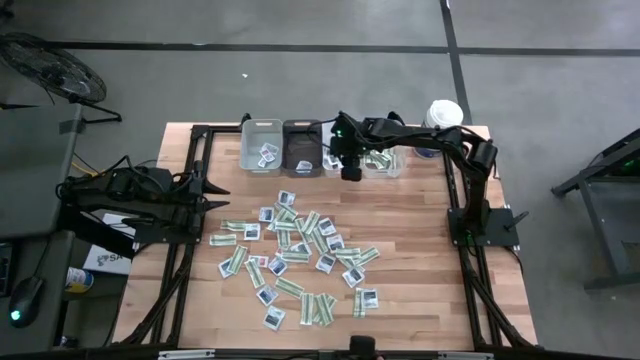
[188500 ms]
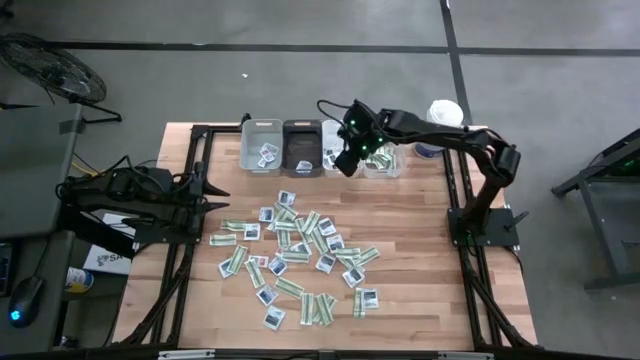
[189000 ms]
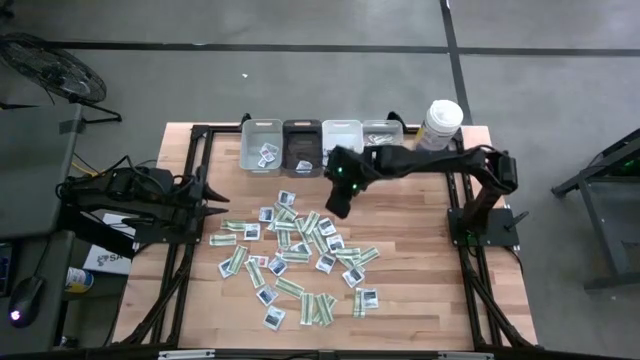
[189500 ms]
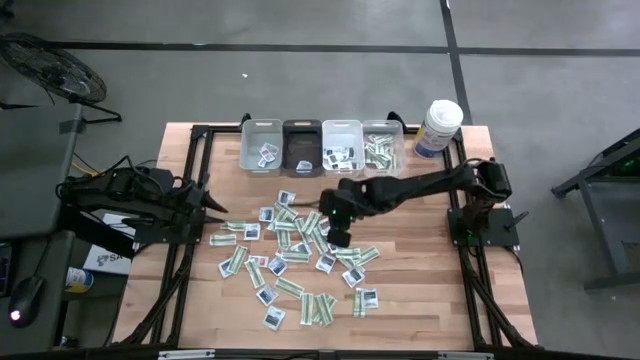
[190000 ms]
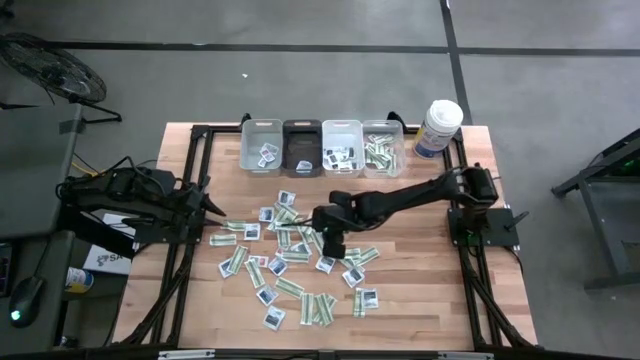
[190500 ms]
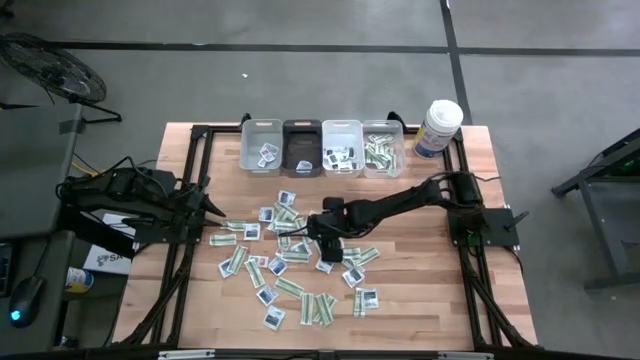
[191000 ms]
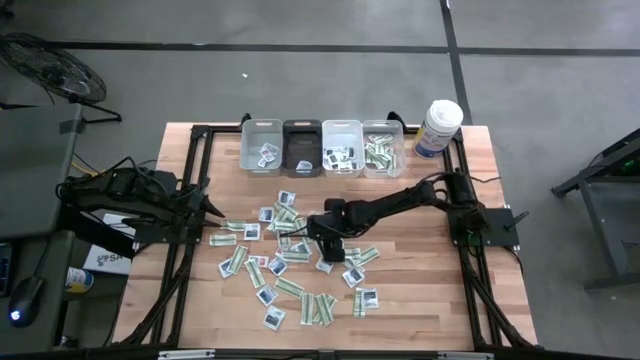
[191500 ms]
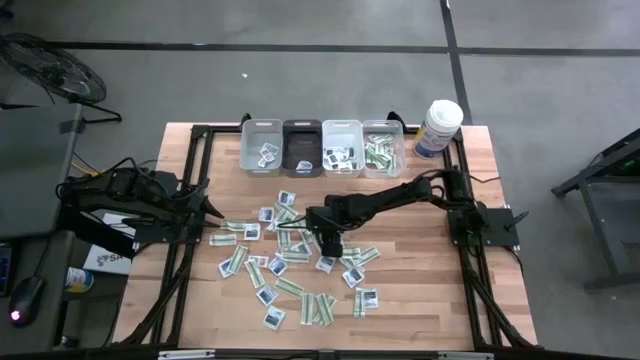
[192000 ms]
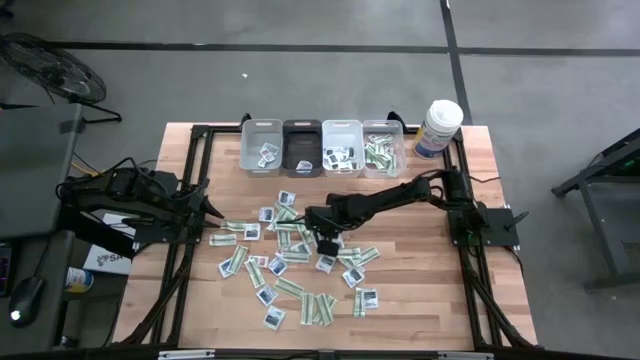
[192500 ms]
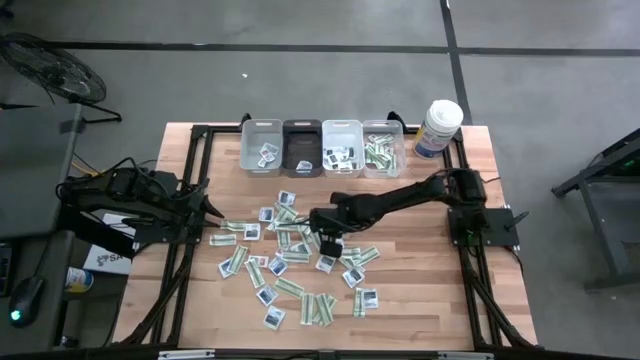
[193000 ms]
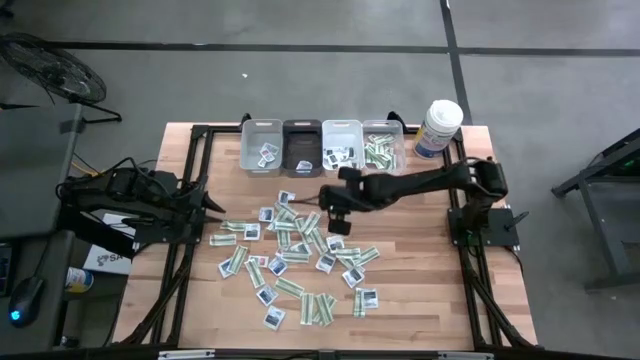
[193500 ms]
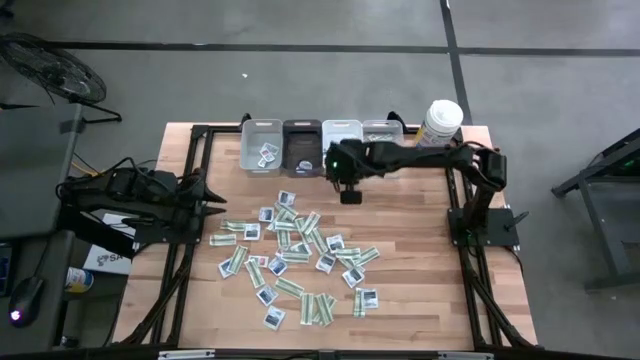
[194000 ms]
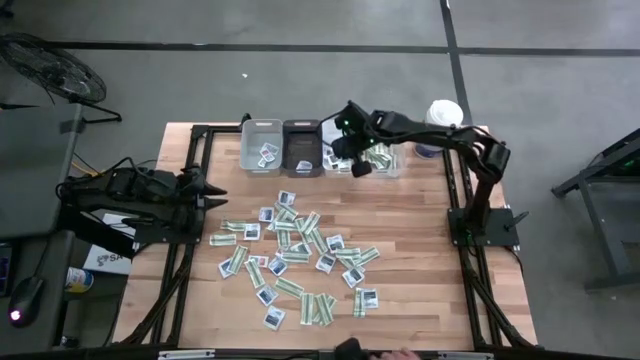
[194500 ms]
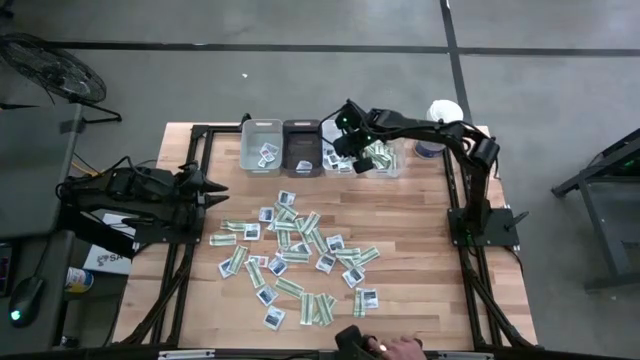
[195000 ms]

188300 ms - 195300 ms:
Task: Pick & Place First Aid Supplies
Put the black towelette pack into the white bin

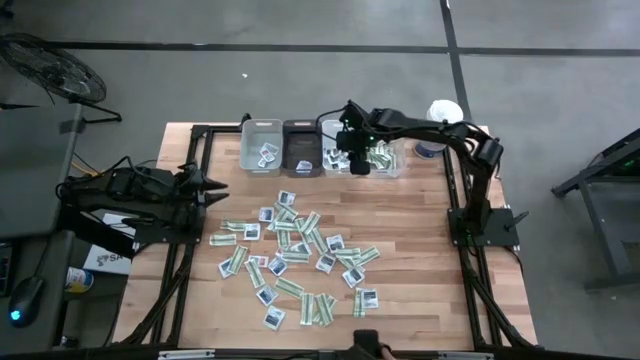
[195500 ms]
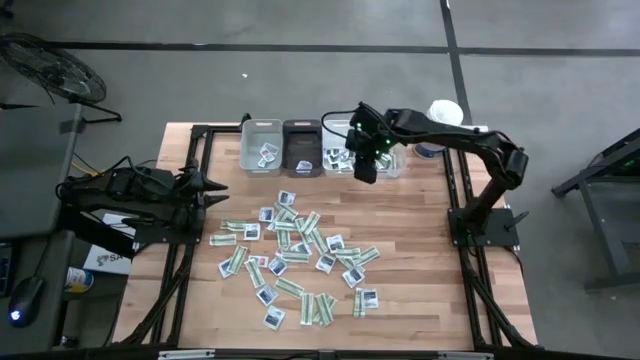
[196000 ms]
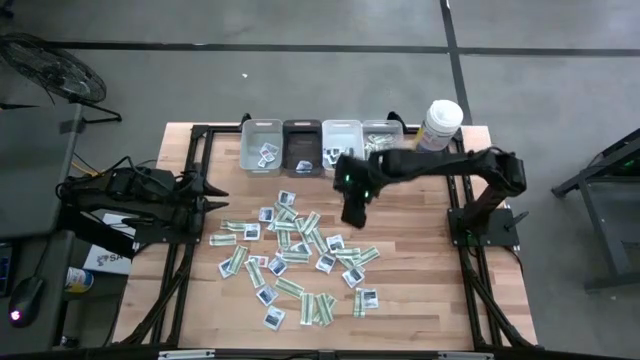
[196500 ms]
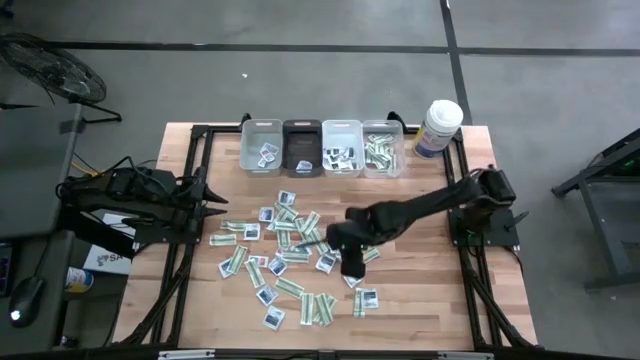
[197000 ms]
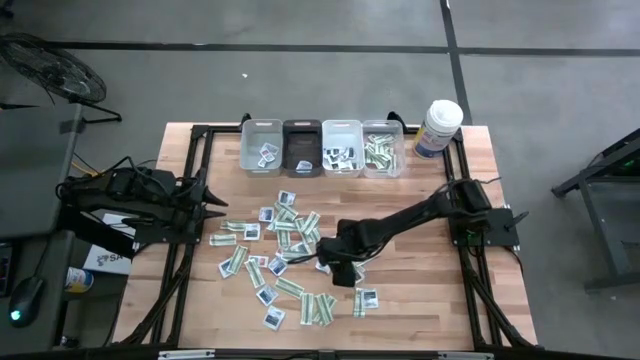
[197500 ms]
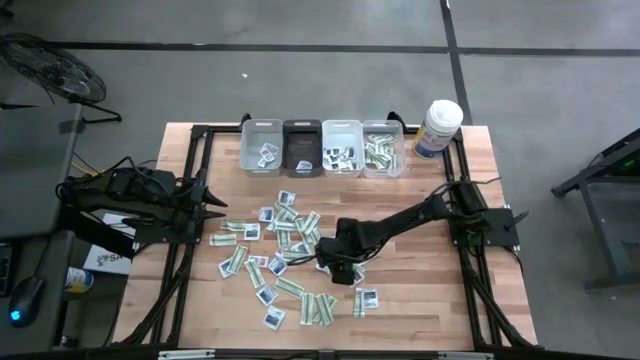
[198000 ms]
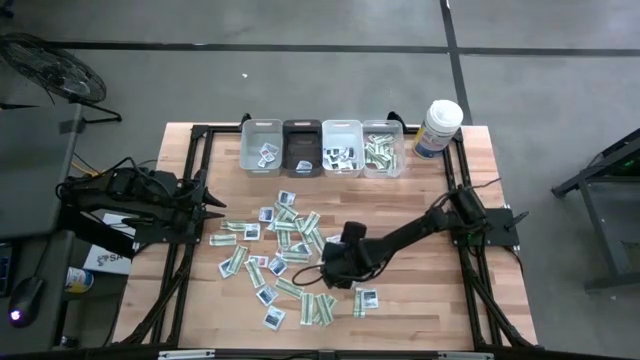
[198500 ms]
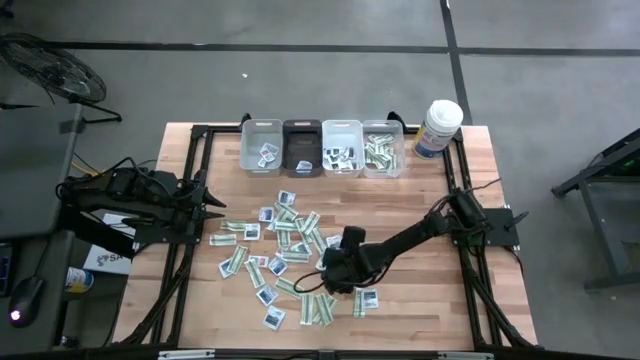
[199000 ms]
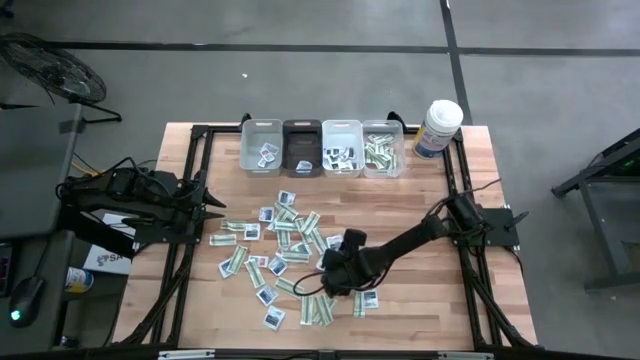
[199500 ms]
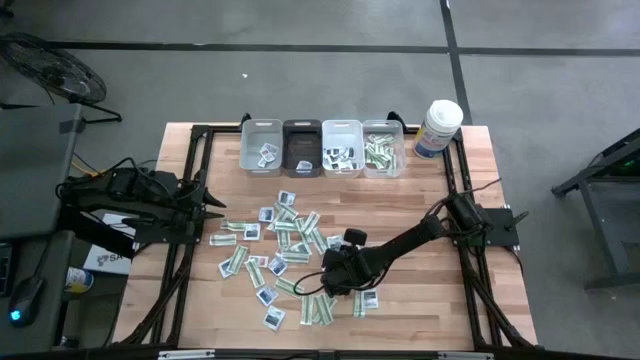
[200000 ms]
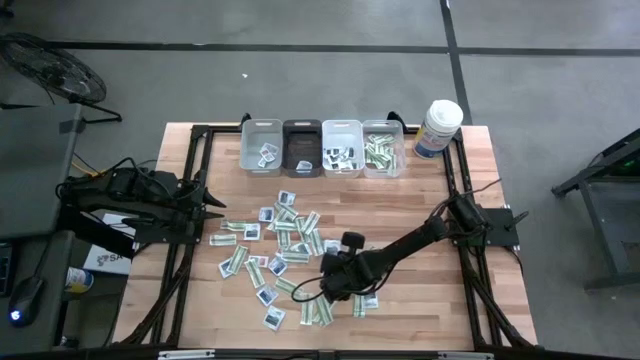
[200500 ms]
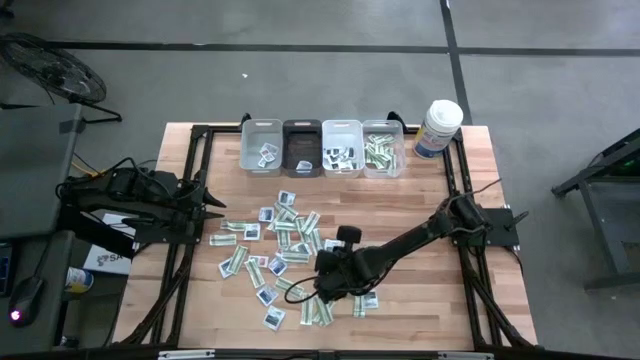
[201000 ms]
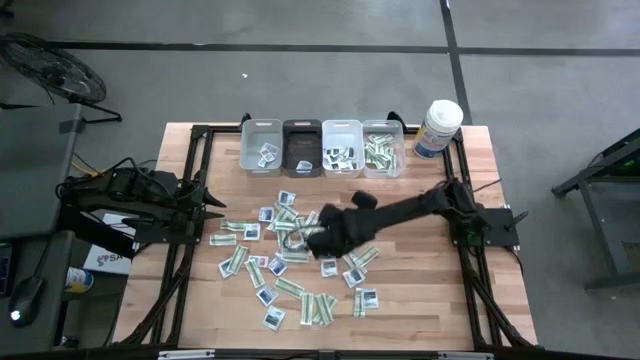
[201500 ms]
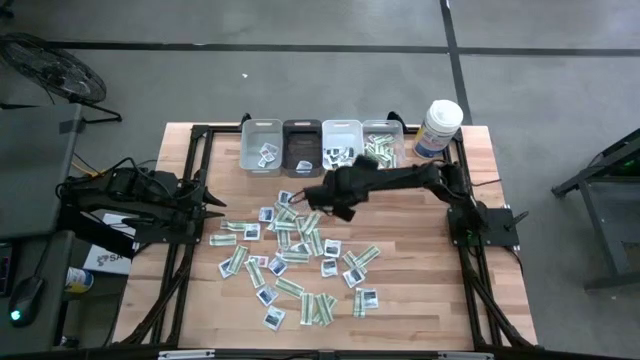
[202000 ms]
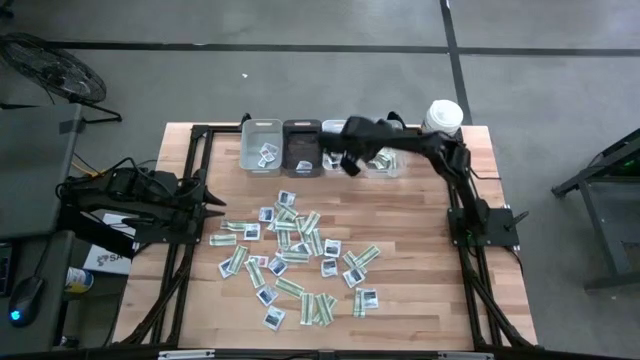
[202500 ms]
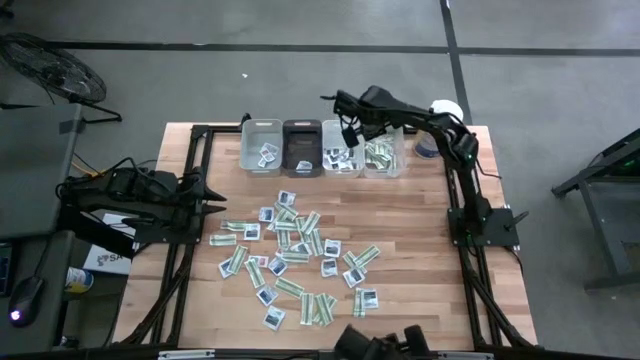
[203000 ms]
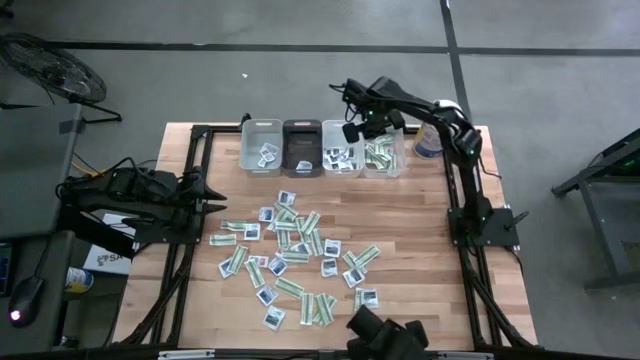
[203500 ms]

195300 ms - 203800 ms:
Put the green bandage into the transparent bin

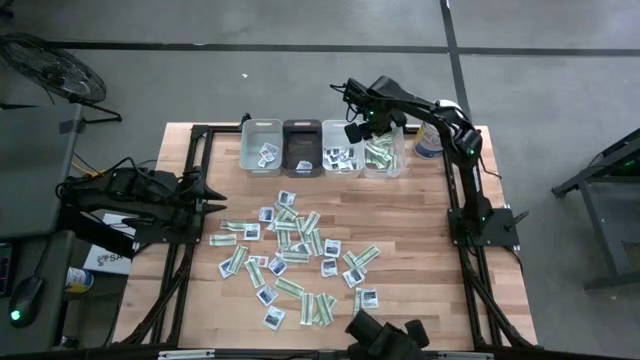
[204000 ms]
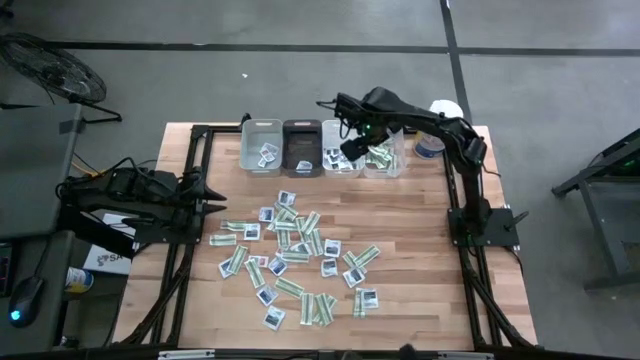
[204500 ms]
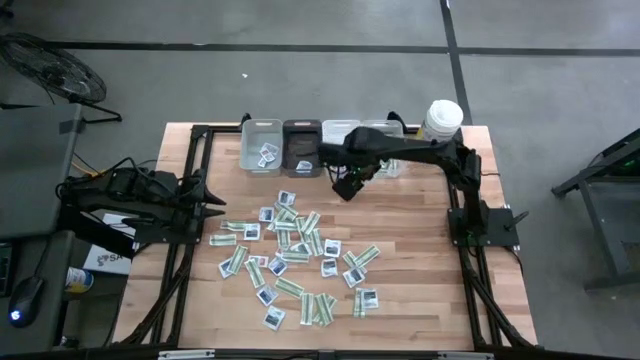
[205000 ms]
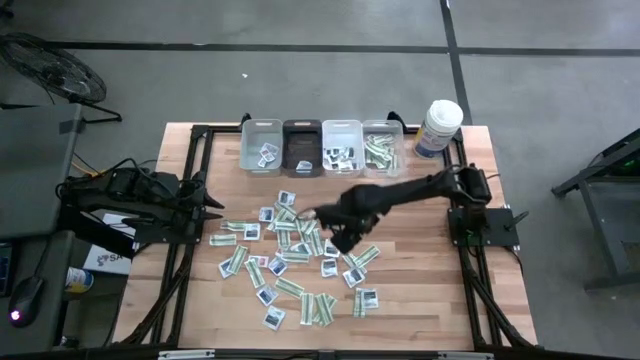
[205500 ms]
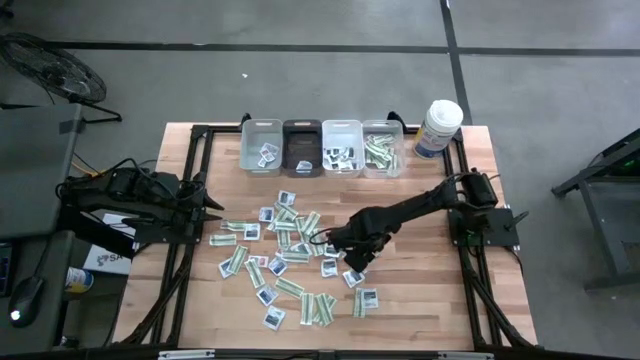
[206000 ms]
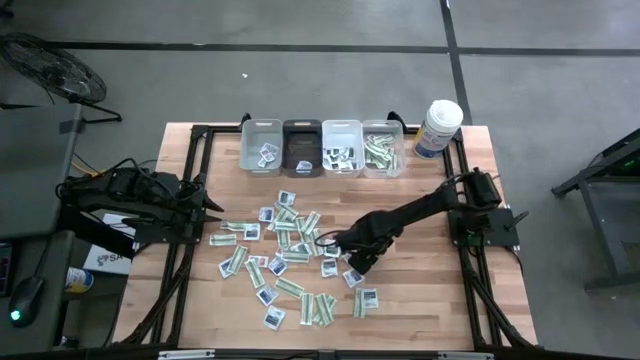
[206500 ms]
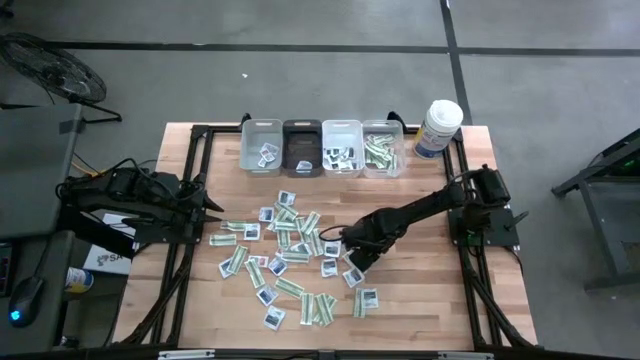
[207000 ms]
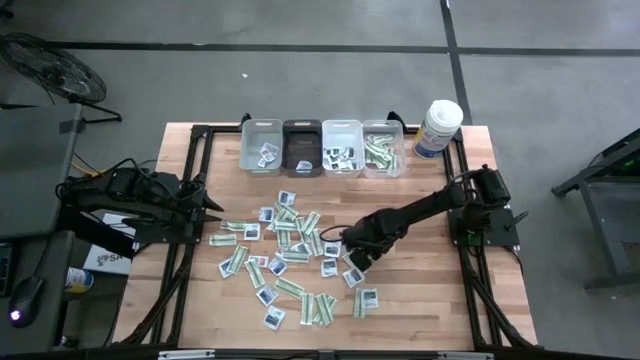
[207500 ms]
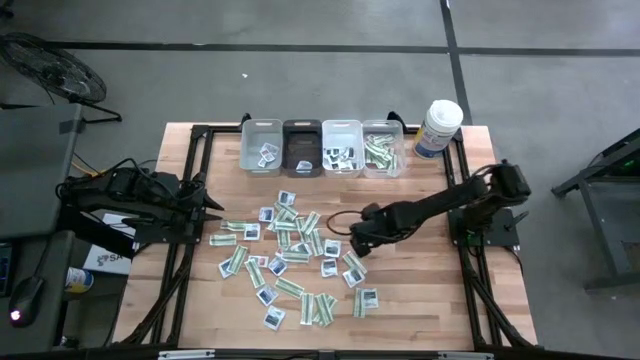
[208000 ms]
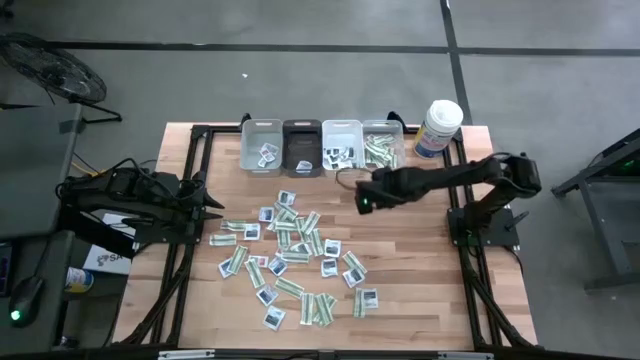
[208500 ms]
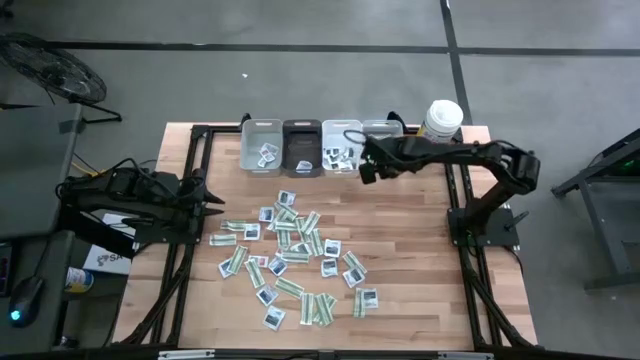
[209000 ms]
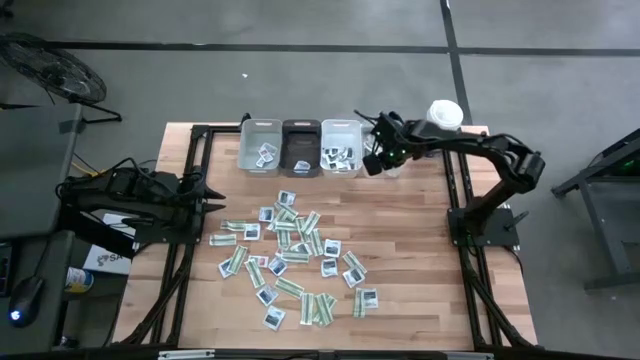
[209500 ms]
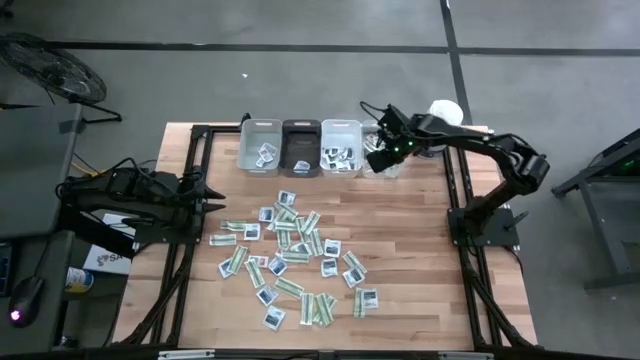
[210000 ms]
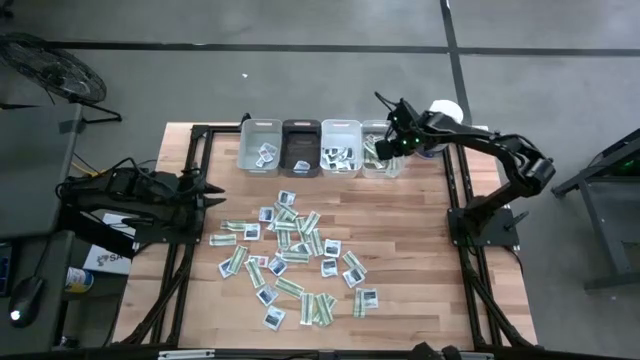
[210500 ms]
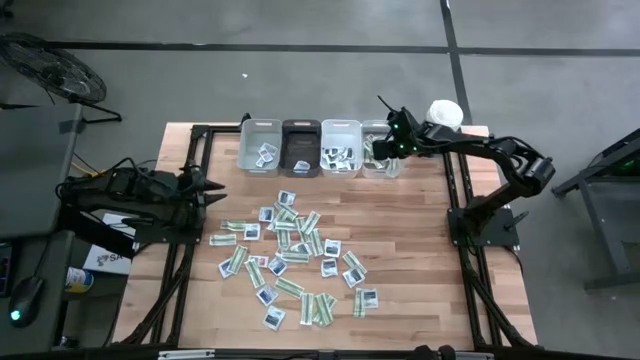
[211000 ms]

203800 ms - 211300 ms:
Put the green bandage into the transparent bin
